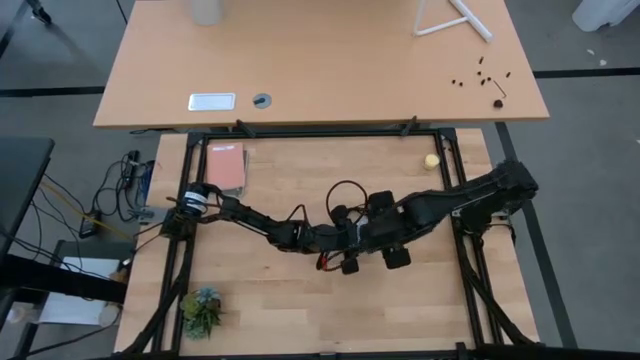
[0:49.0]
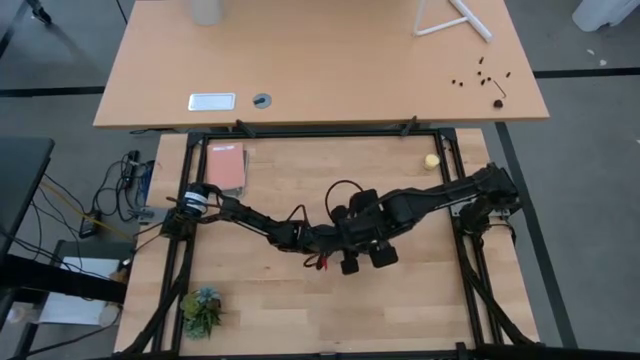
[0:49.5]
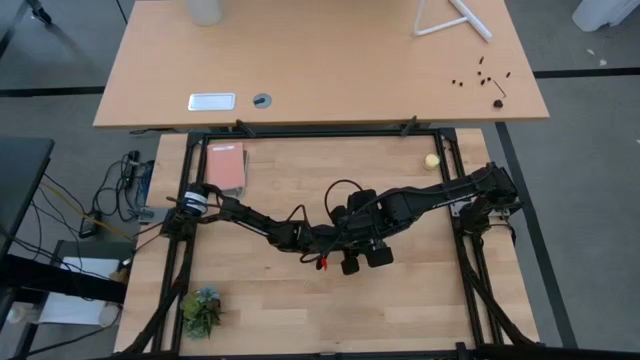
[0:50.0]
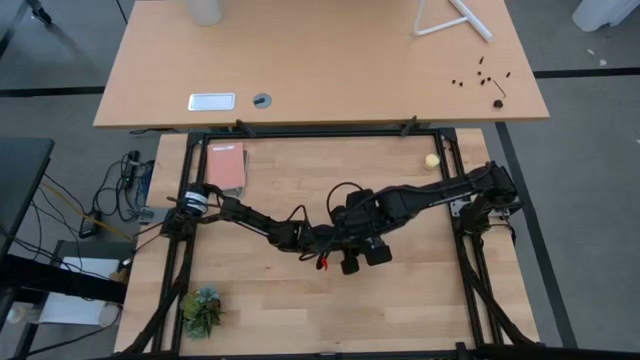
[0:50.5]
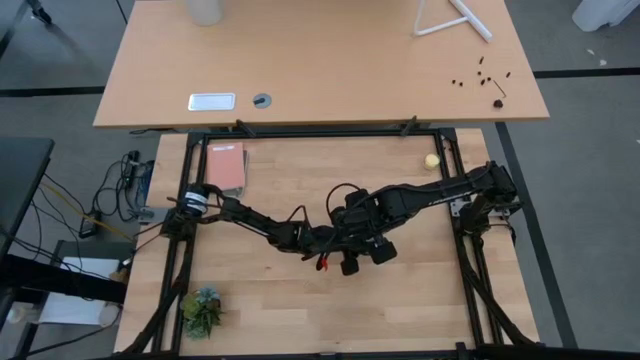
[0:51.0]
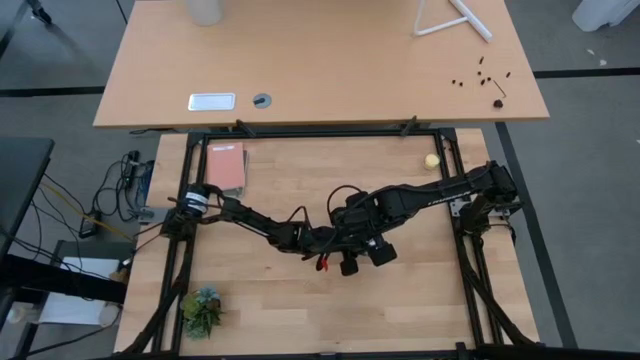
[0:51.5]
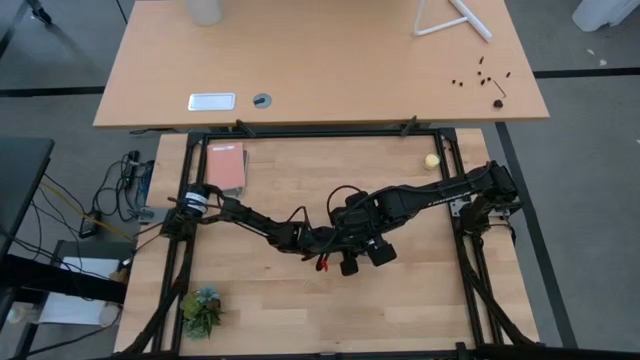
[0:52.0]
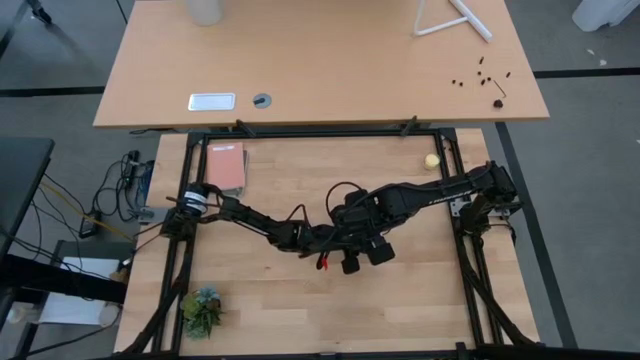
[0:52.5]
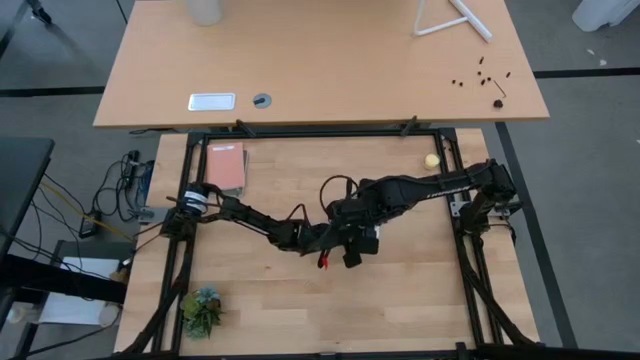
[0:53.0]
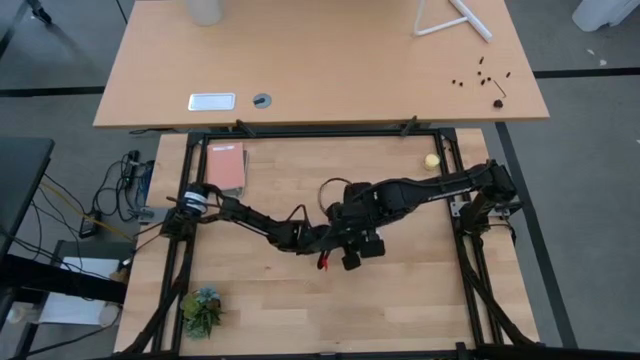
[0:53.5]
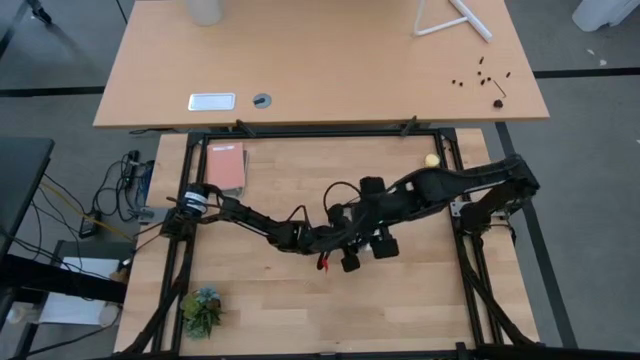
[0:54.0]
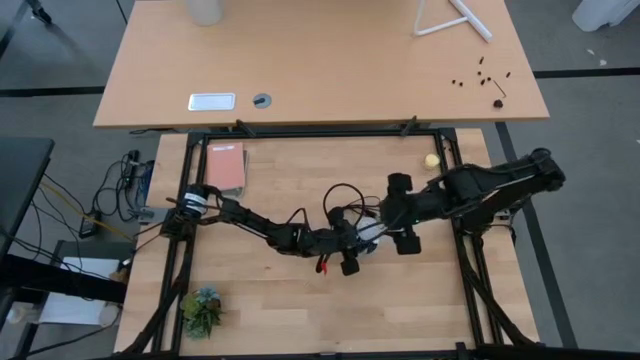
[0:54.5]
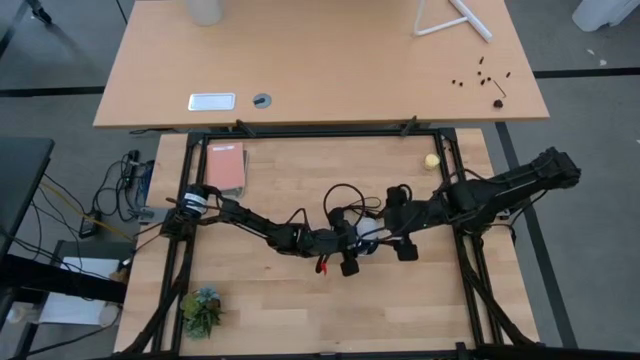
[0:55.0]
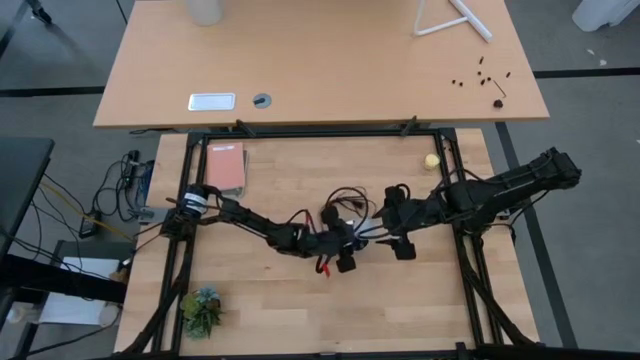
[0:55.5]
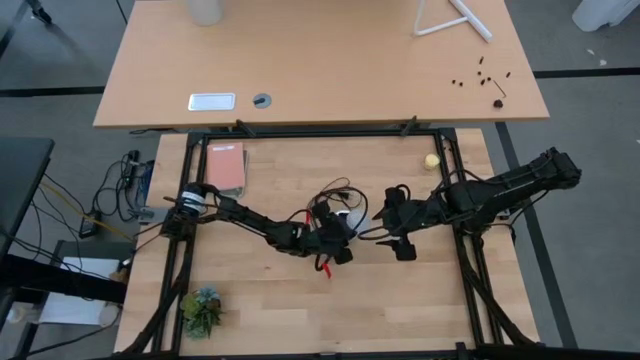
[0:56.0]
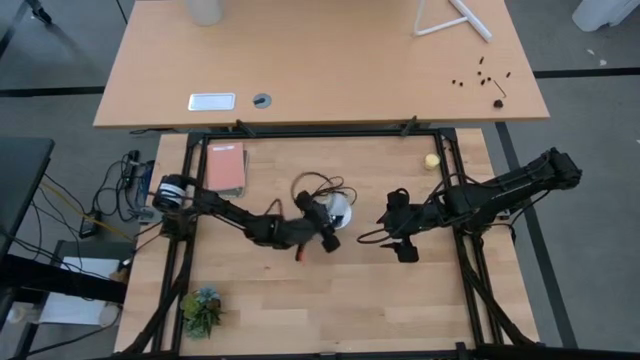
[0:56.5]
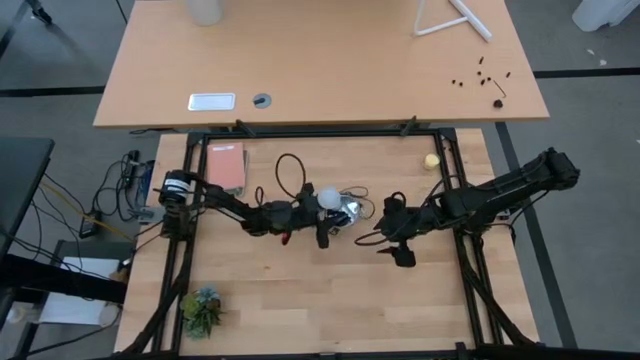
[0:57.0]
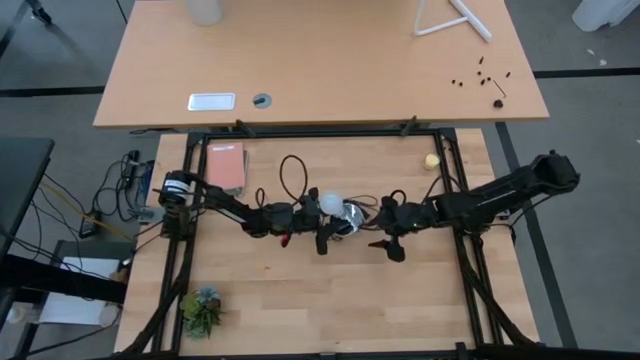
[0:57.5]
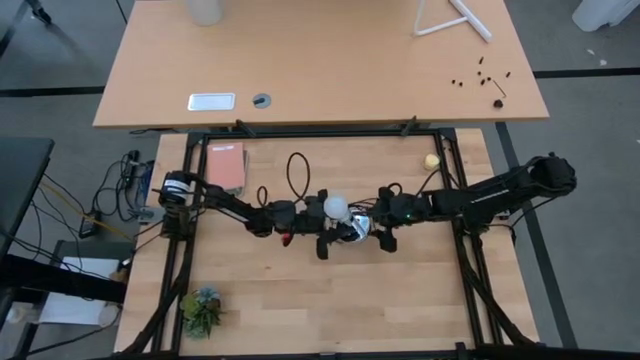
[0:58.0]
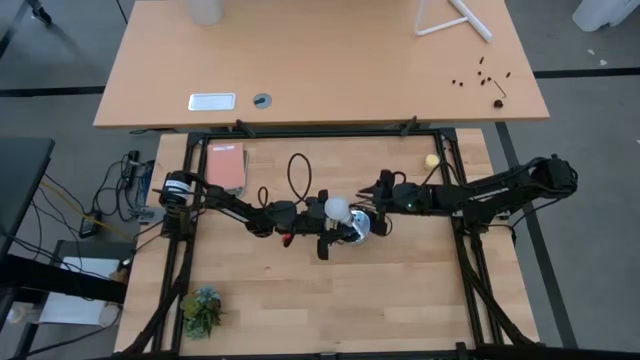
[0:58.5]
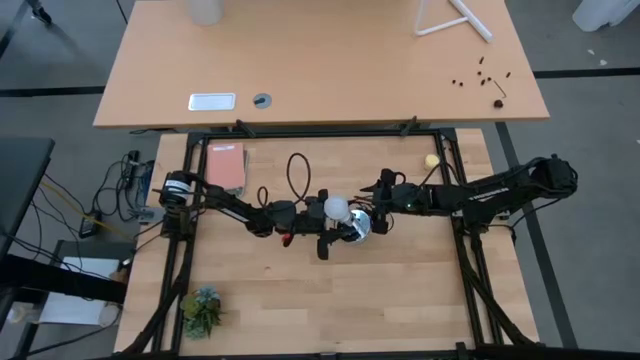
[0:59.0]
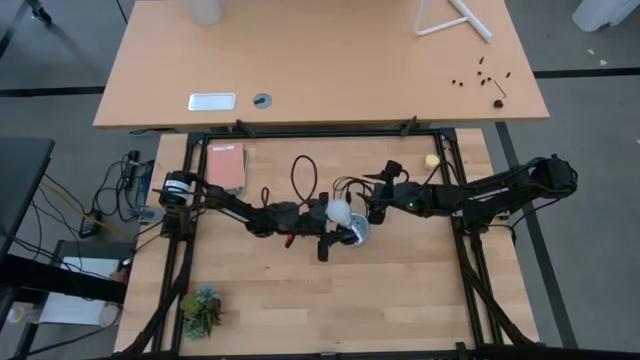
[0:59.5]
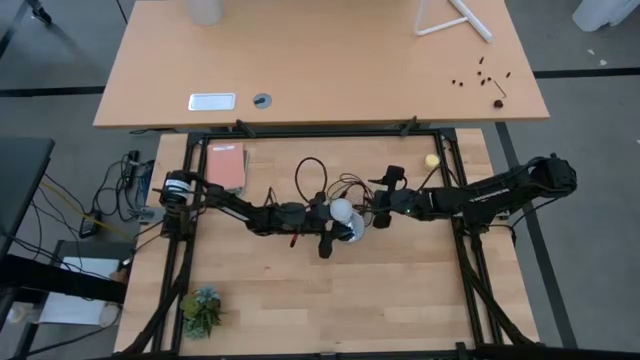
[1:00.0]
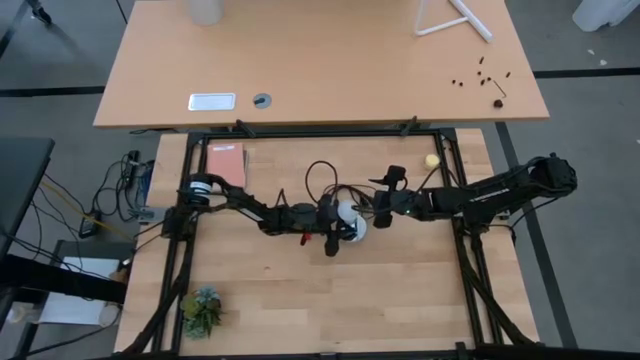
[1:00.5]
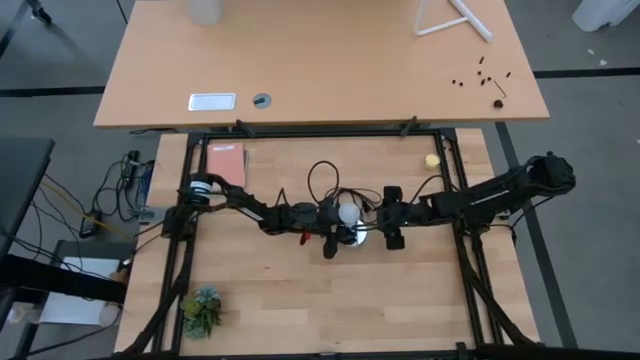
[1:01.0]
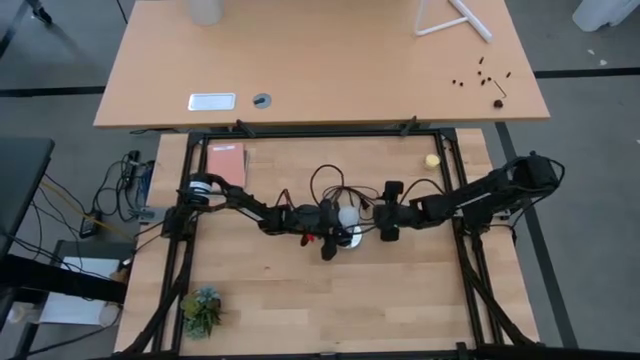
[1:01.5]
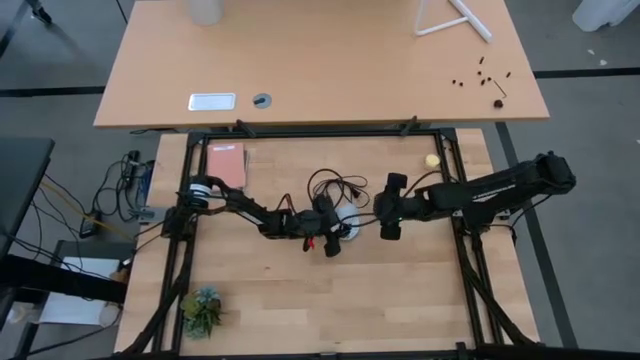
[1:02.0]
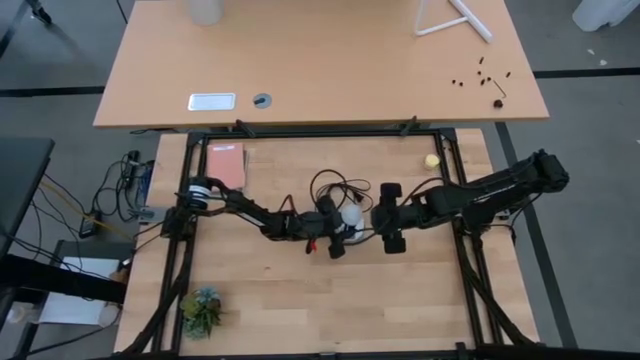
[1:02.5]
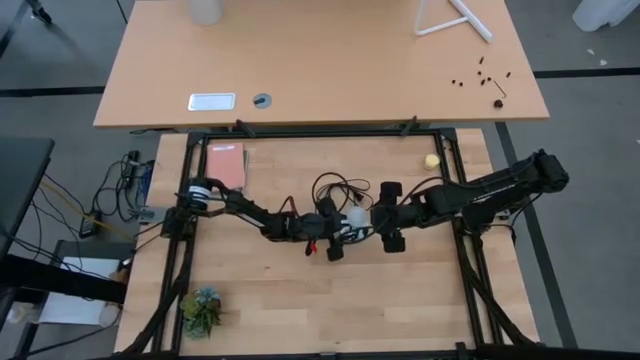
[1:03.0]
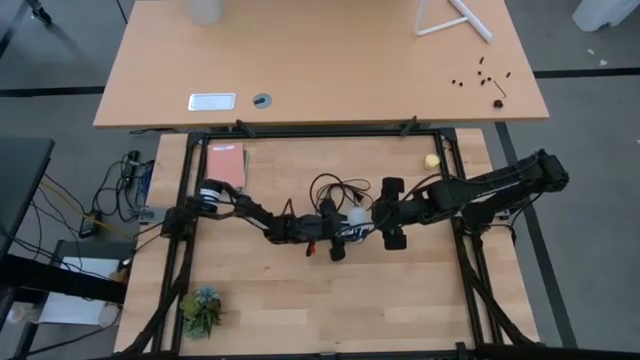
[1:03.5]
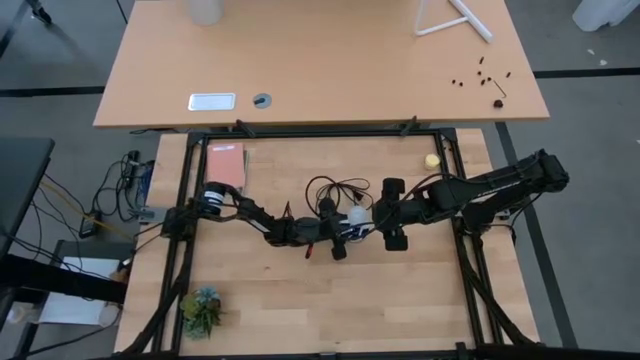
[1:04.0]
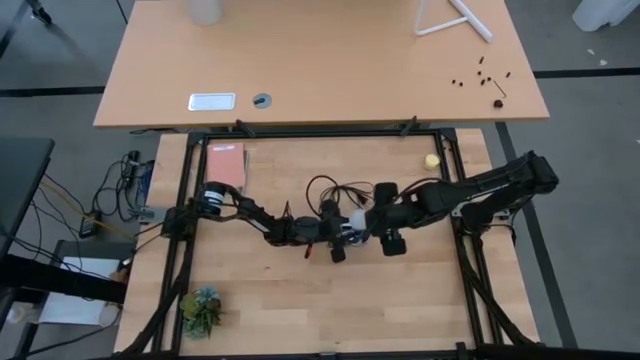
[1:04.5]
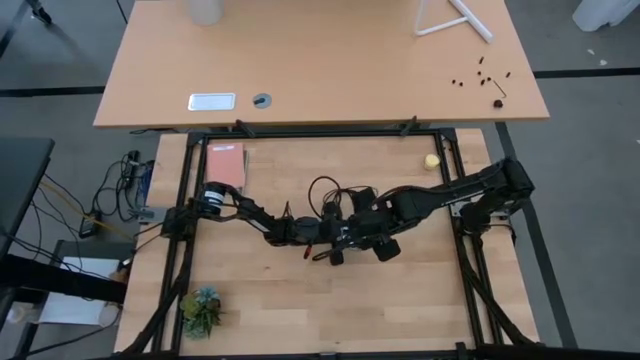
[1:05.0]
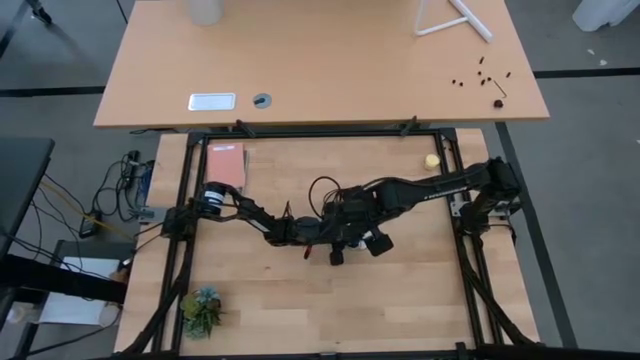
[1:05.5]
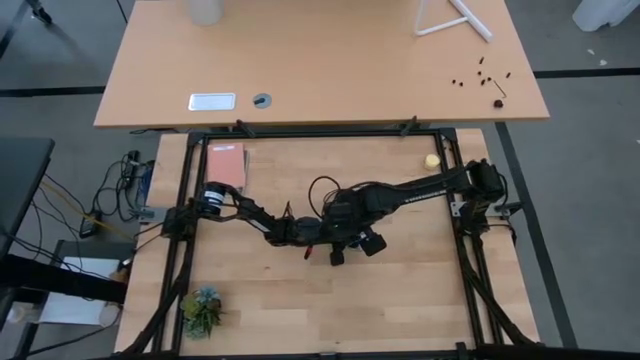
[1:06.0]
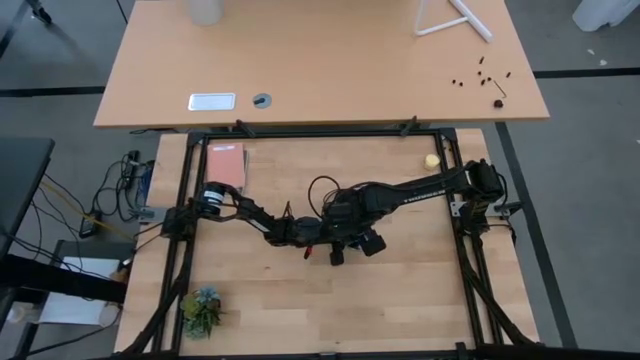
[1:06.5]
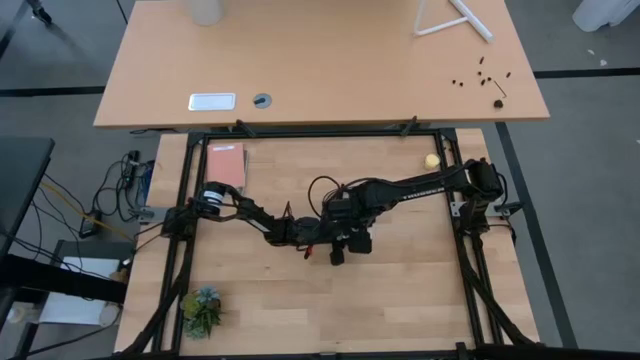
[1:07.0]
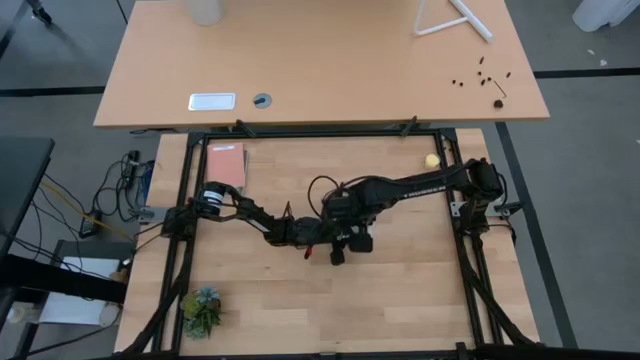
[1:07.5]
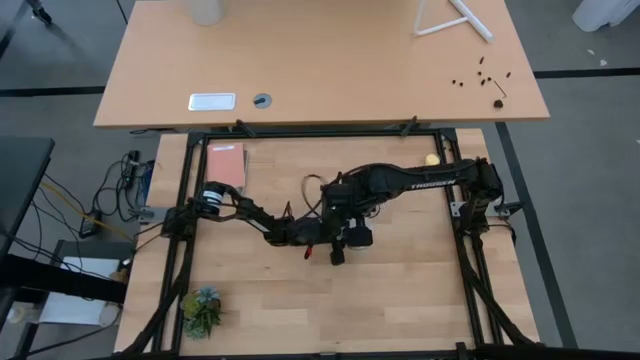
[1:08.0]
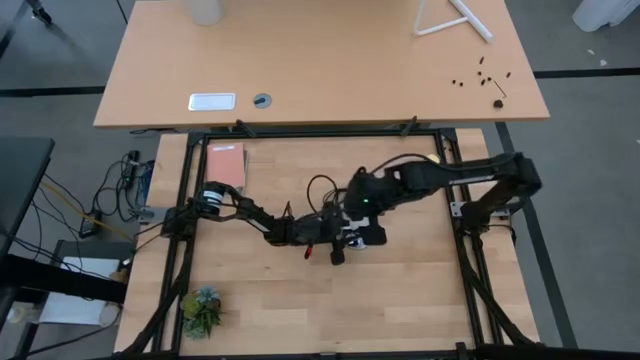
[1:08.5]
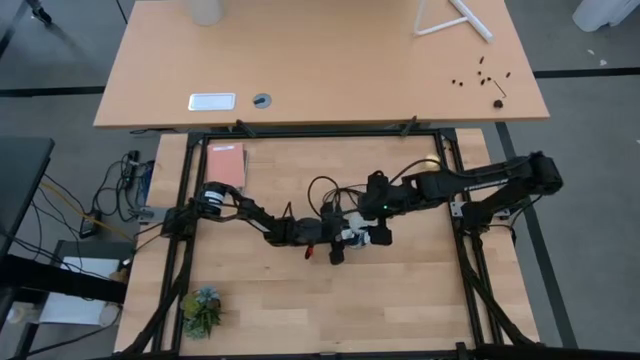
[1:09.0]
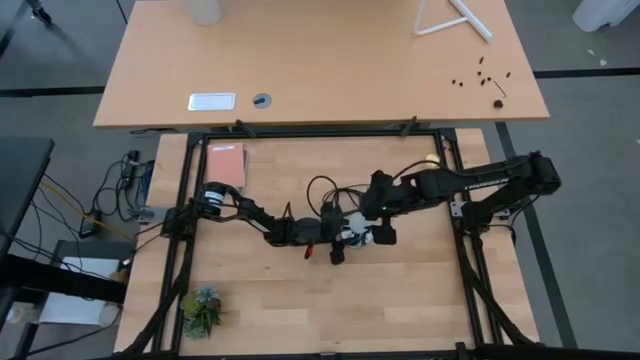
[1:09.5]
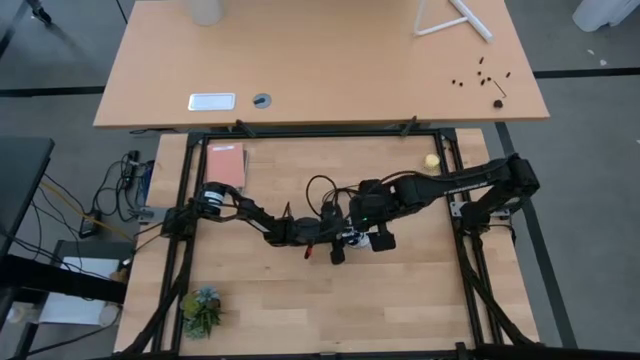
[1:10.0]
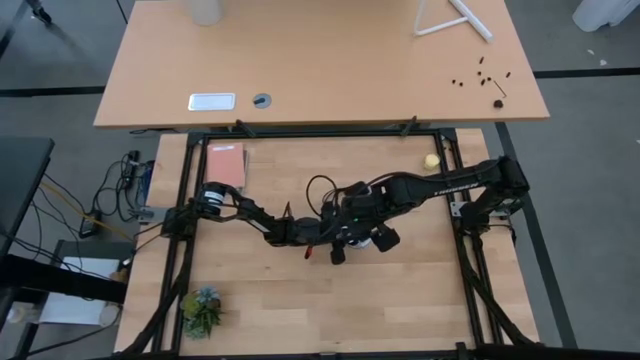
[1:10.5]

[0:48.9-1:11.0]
Task: Screw lightbulb
Insert the lightbulb into the lamp
